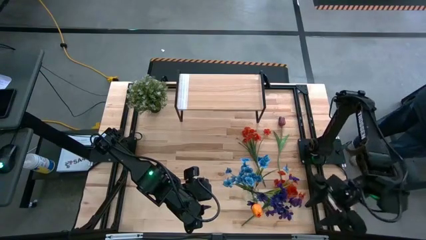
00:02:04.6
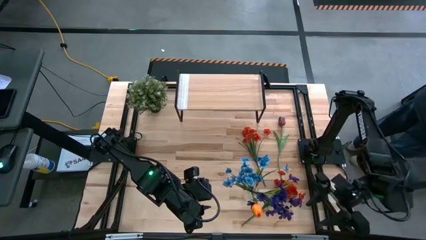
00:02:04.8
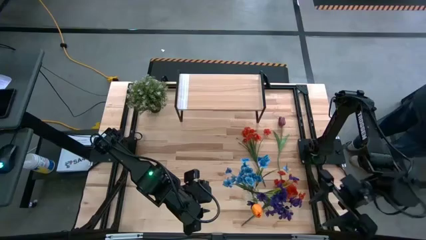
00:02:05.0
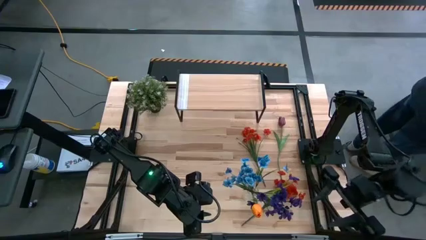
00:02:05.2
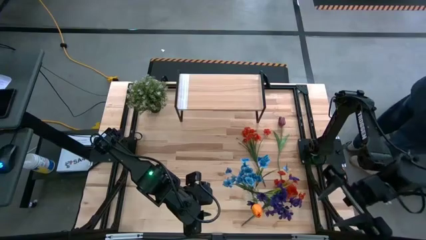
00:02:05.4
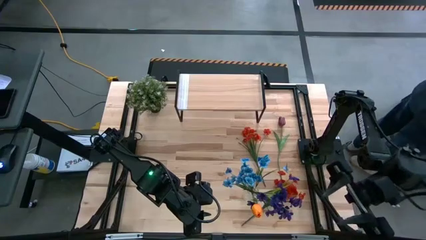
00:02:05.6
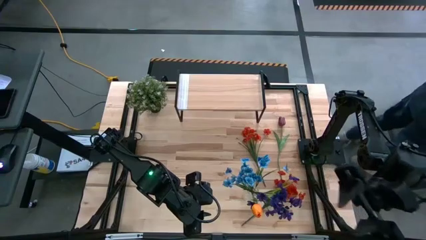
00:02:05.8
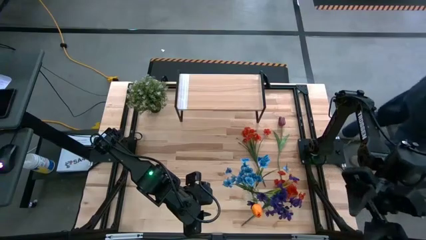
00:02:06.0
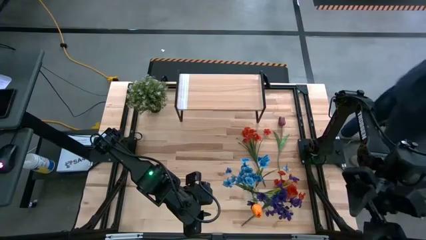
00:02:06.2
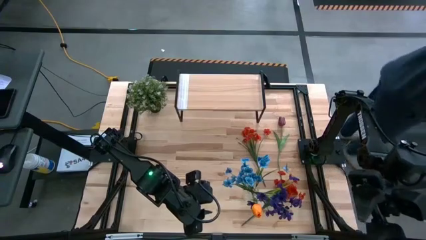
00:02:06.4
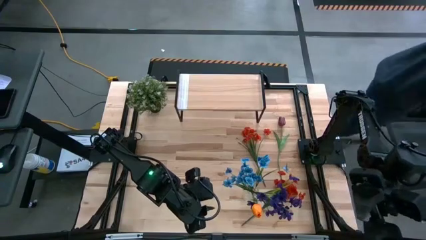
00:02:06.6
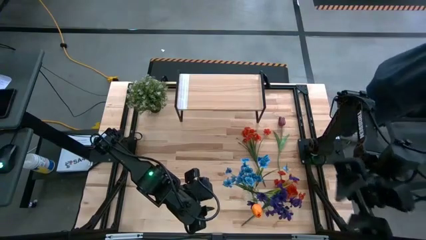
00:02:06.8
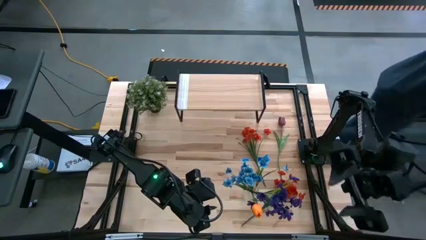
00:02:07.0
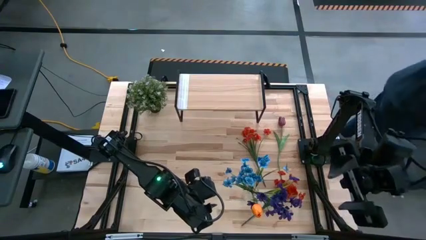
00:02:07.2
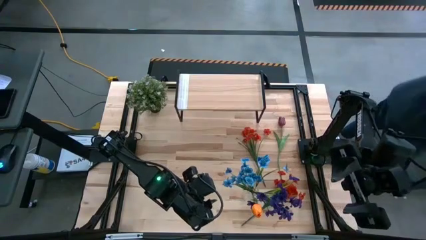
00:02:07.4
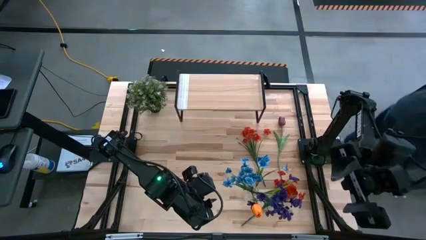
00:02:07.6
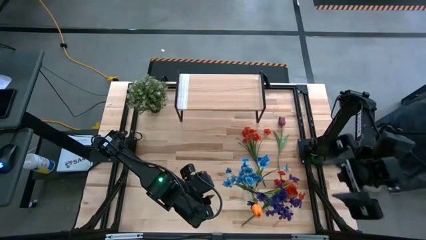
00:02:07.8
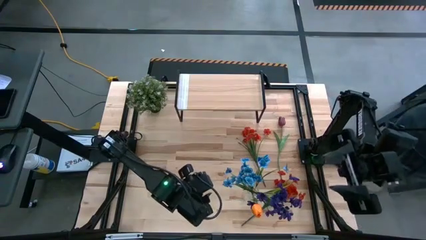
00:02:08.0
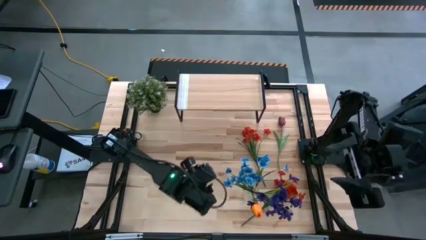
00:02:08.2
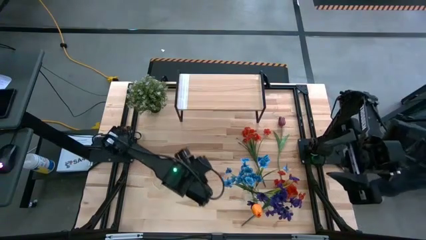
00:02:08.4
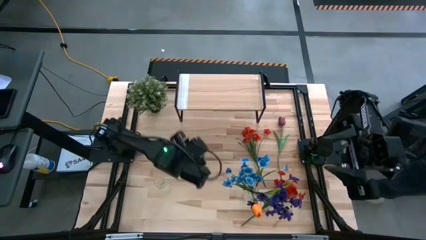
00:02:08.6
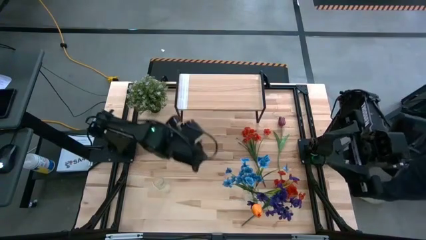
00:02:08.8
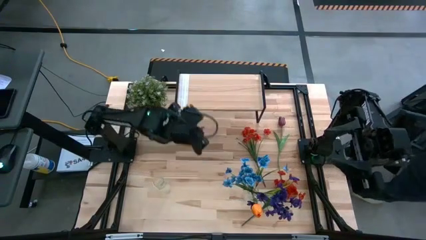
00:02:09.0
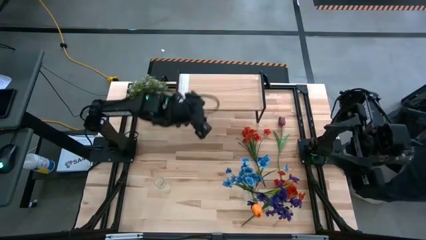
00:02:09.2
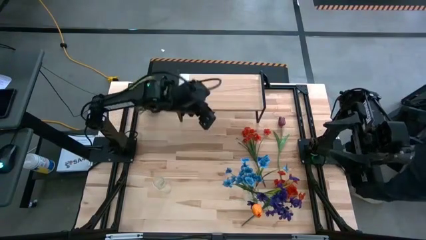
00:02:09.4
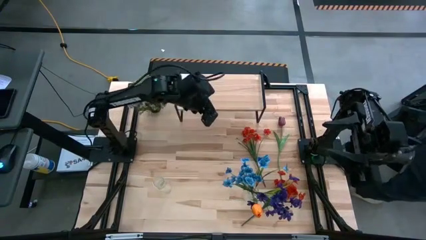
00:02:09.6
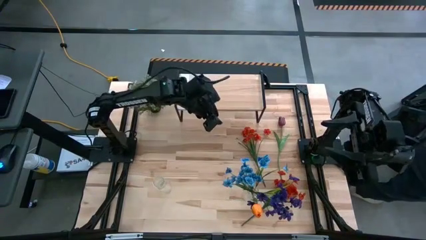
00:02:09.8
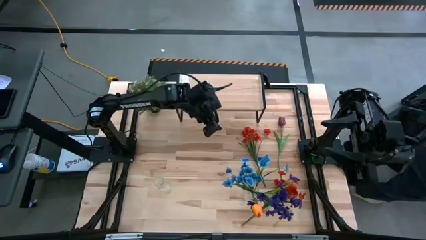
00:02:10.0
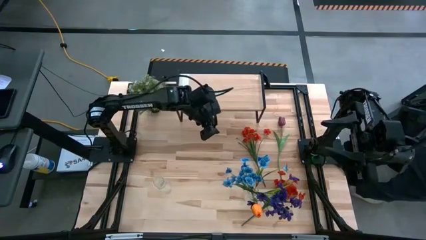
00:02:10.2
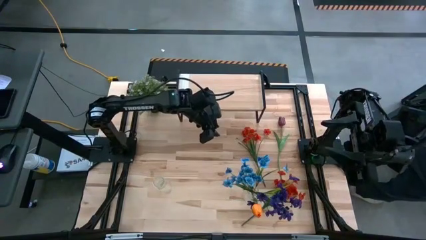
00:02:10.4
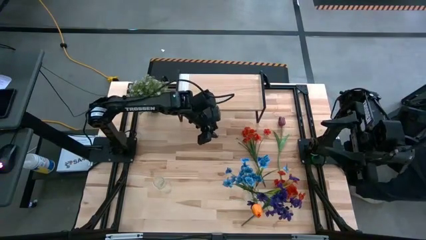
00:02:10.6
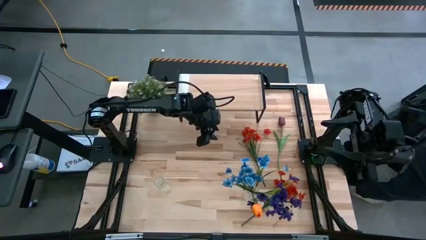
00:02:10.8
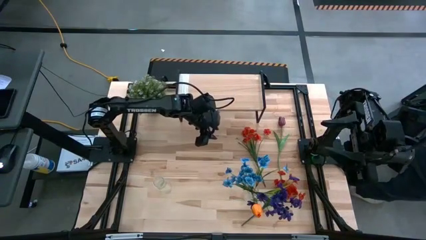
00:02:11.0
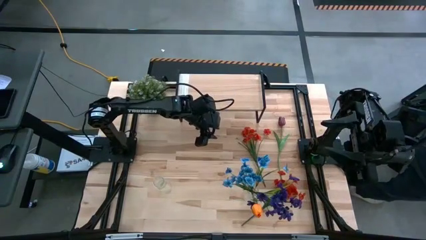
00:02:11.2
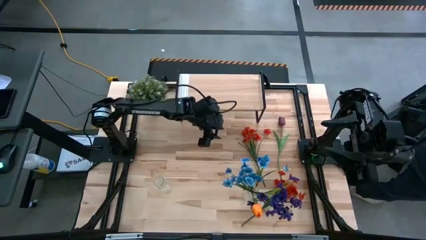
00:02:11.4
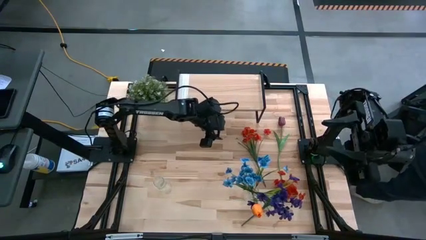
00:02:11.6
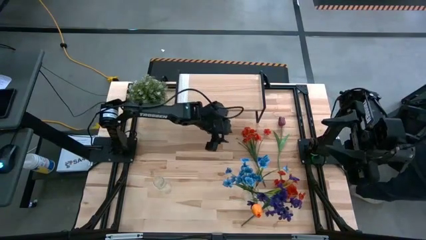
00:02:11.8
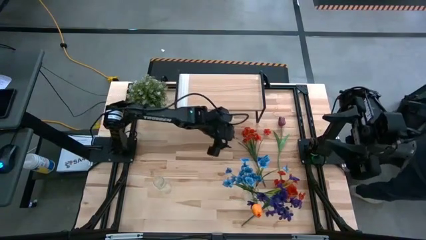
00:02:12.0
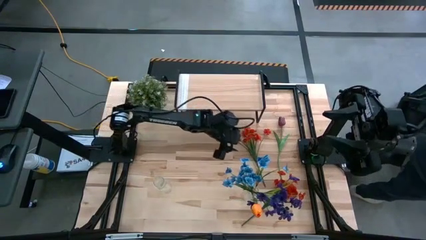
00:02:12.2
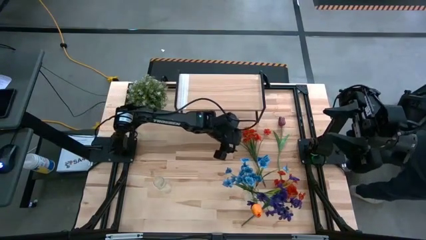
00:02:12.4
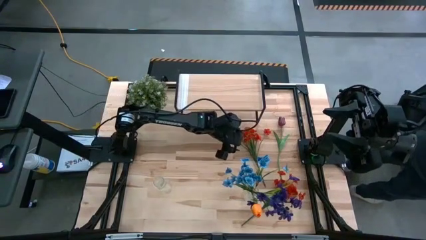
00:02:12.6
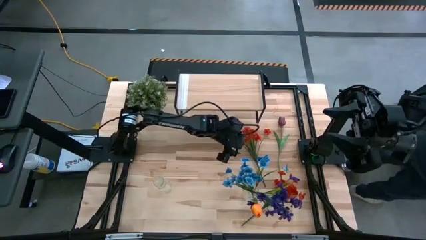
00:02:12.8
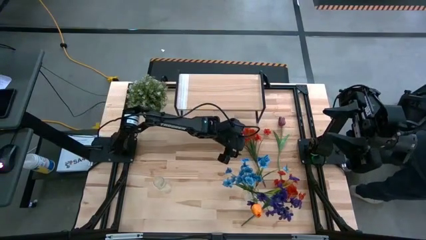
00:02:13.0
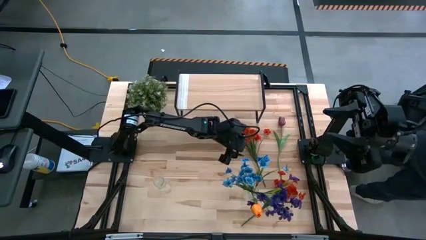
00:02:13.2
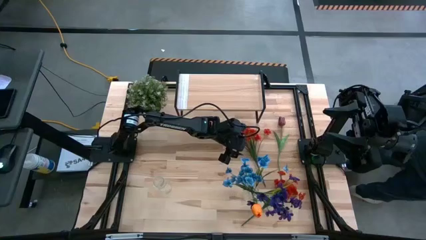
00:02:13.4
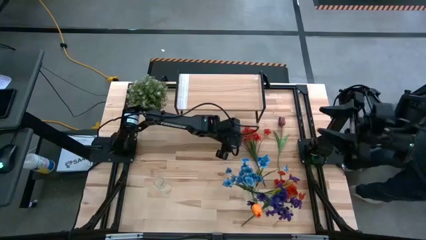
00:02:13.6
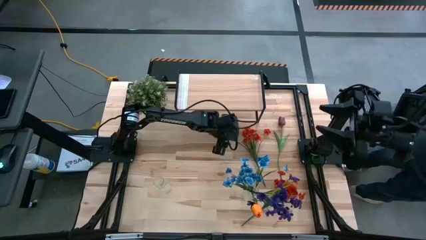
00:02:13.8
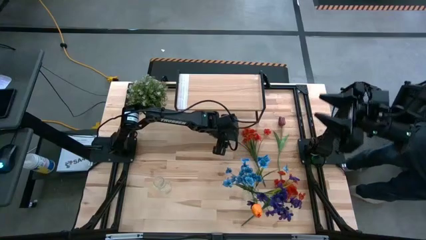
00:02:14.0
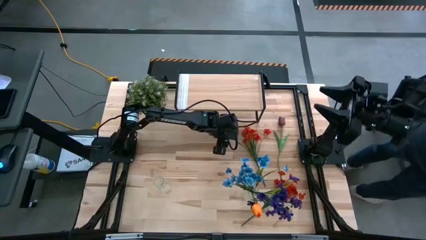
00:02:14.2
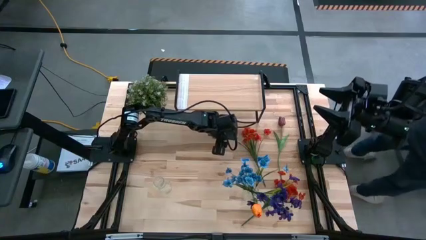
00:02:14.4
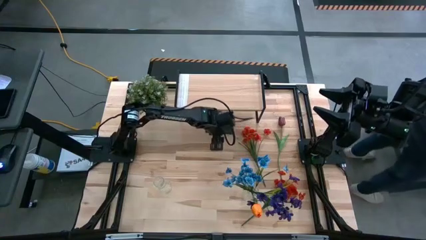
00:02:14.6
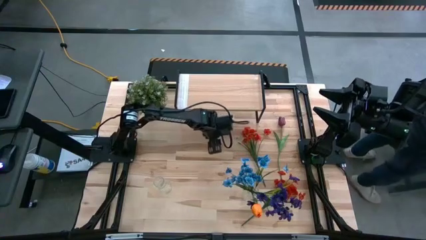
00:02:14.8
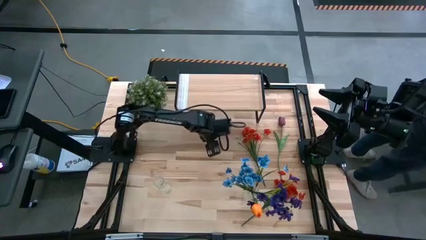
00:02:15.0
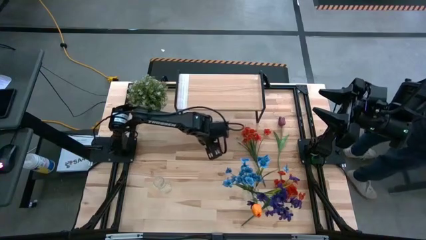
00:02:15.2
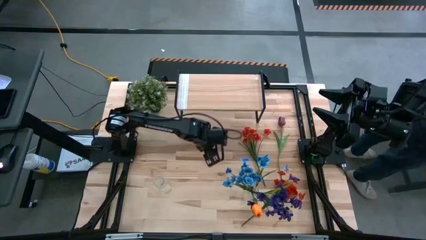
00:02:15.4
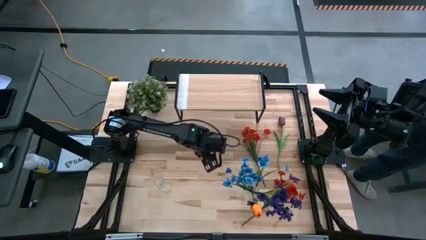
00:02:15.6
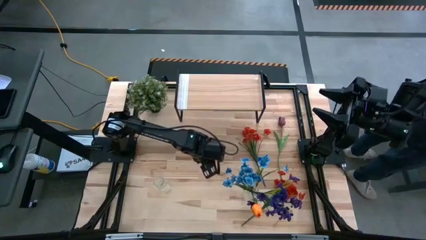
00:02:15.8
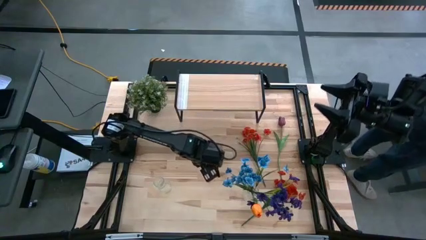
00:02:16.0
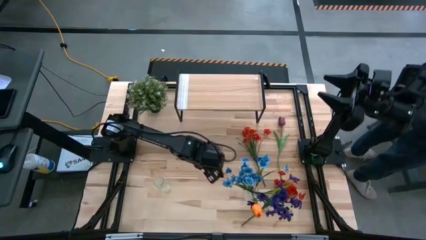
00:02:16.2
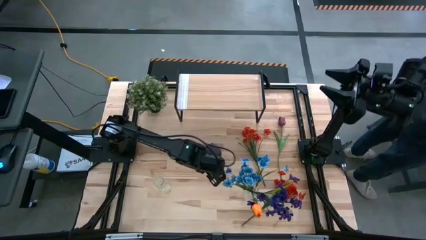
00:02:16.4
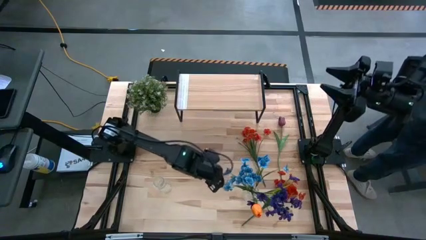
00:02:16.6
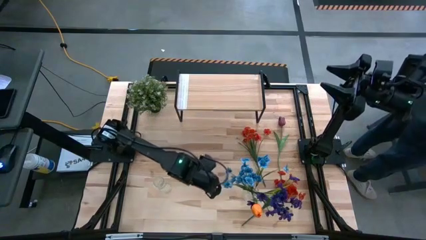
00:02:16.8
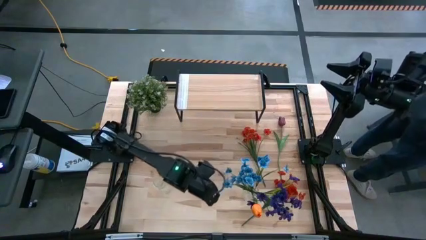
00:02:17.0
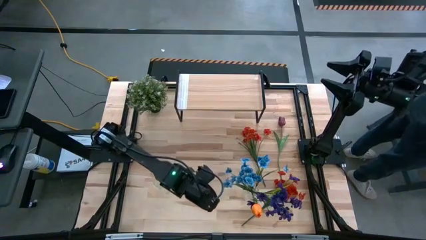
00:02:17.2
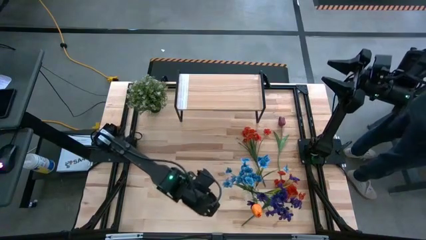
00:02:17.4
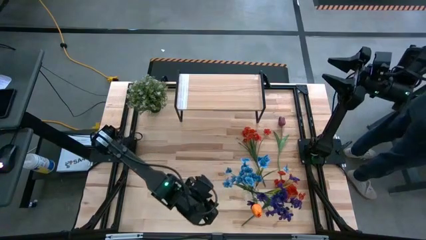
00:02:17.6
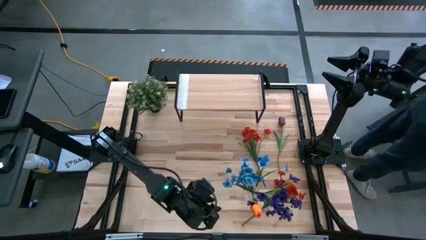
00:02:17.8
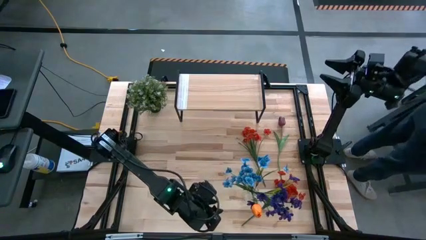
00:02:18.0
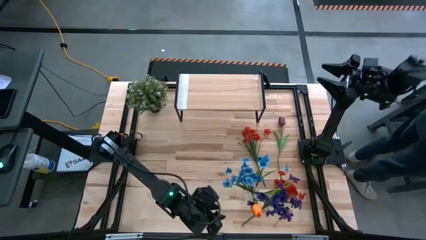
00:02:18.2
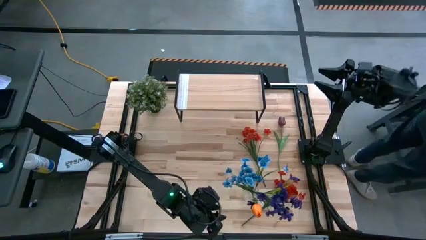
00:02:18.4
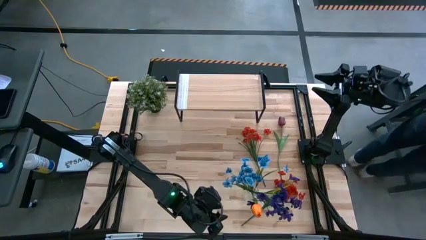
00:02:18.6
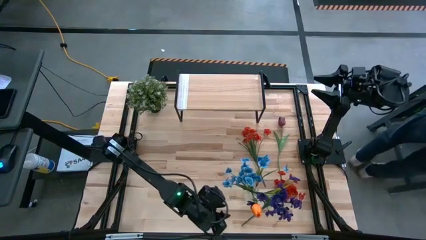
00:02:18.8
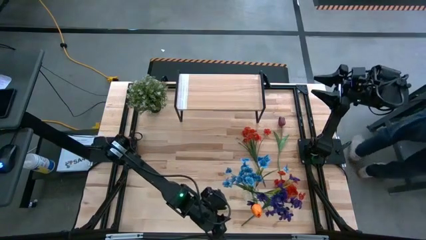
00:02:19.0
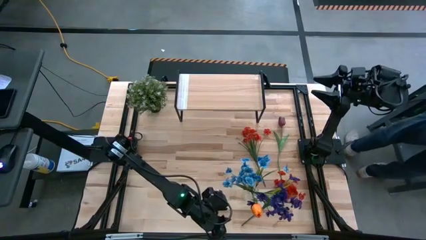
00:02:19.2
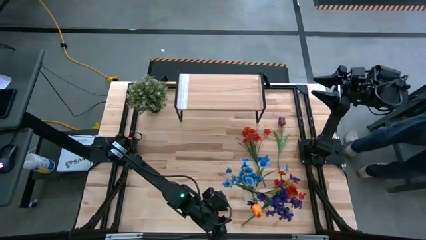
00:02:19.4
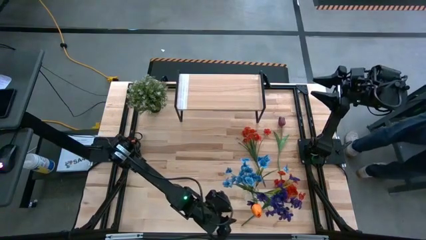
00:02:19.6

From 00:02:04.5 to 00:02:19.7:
Task: Pick and place flowers into a vace then onto a shelf
Put the bottom orange flowers into the left transparent vase
